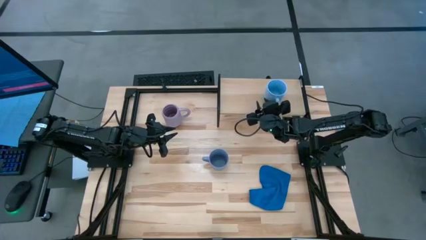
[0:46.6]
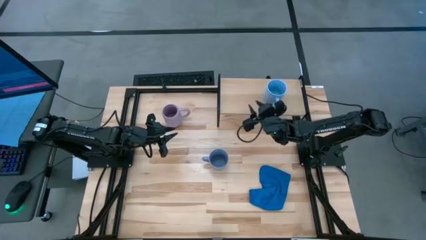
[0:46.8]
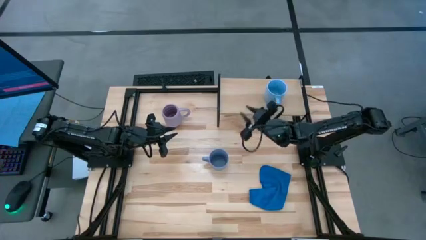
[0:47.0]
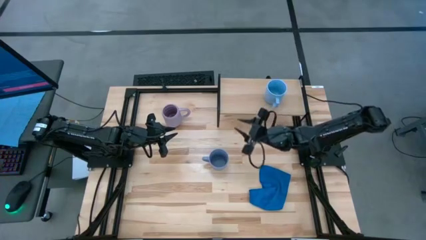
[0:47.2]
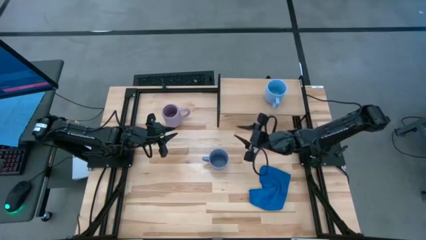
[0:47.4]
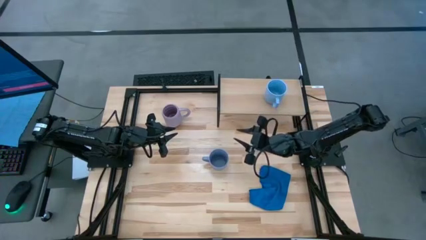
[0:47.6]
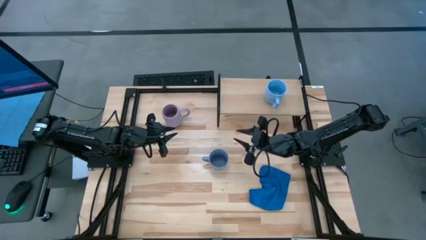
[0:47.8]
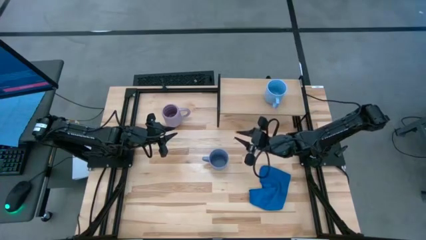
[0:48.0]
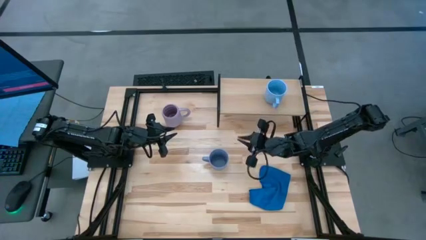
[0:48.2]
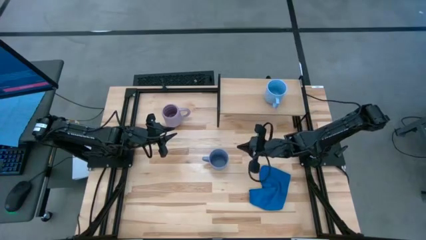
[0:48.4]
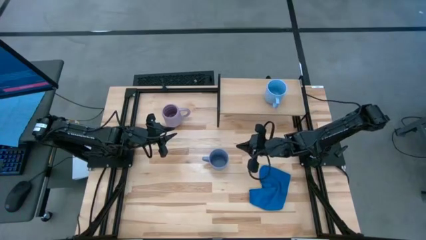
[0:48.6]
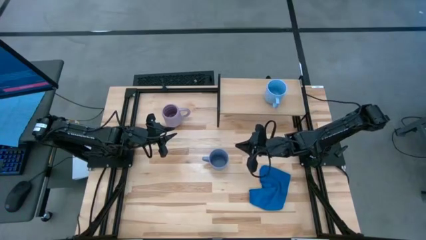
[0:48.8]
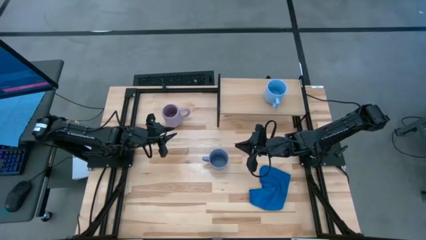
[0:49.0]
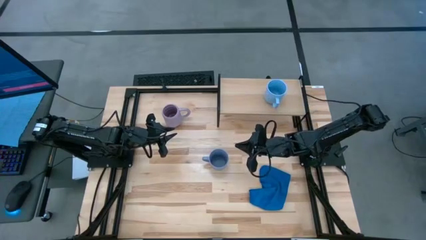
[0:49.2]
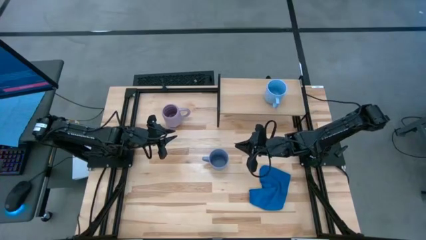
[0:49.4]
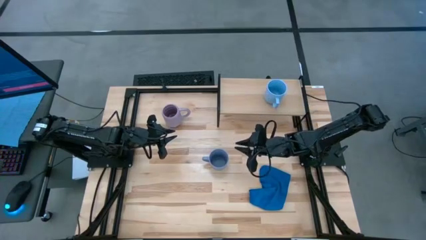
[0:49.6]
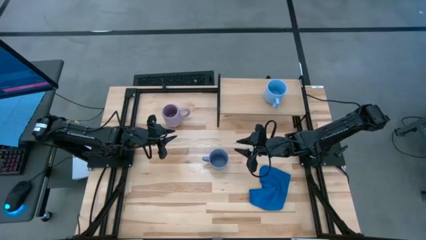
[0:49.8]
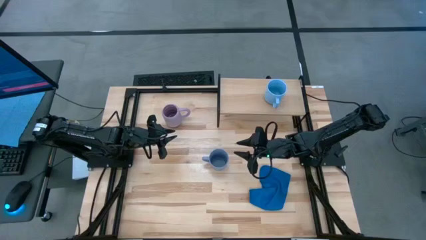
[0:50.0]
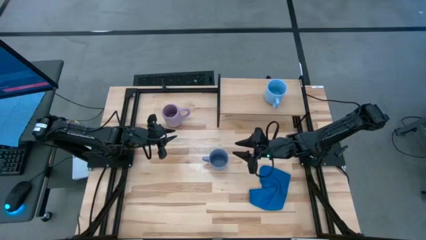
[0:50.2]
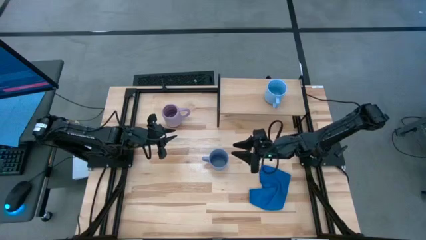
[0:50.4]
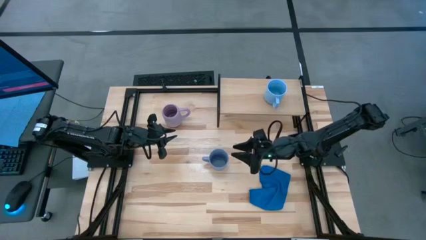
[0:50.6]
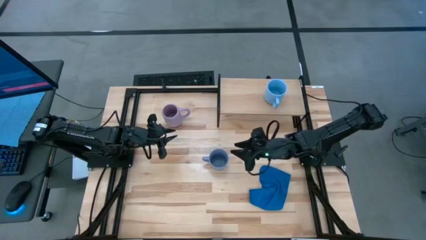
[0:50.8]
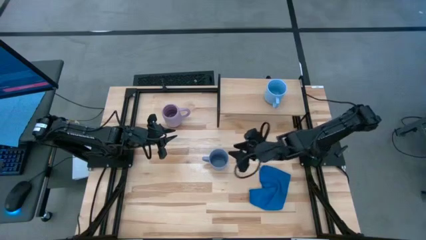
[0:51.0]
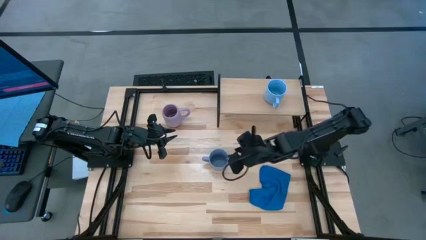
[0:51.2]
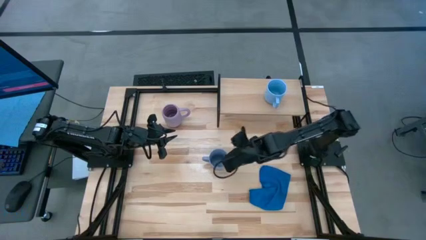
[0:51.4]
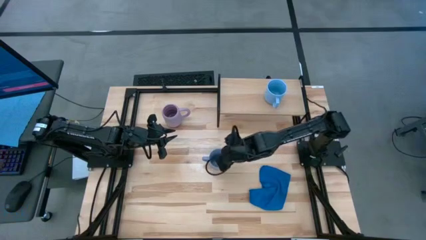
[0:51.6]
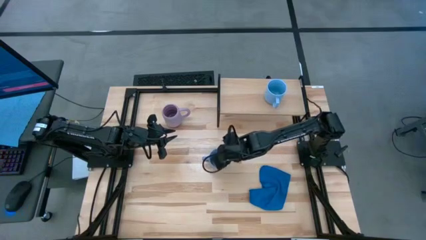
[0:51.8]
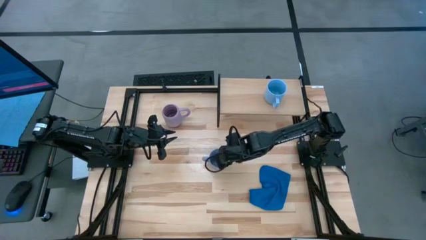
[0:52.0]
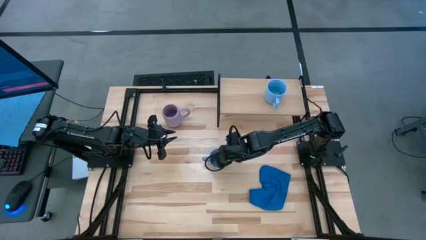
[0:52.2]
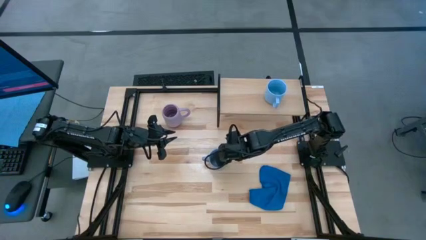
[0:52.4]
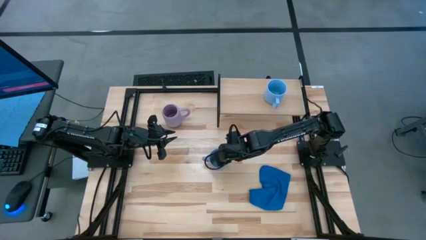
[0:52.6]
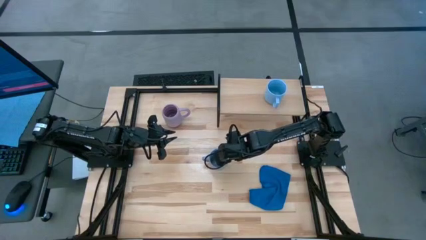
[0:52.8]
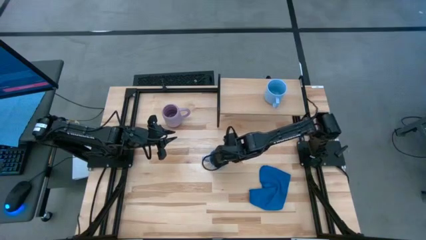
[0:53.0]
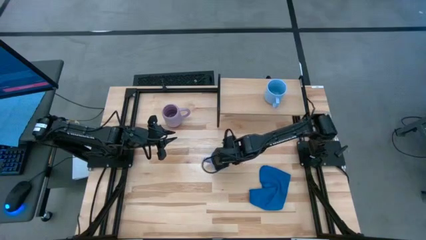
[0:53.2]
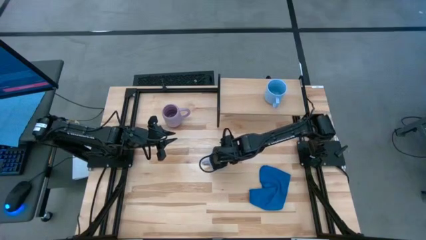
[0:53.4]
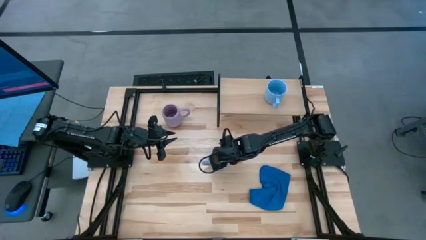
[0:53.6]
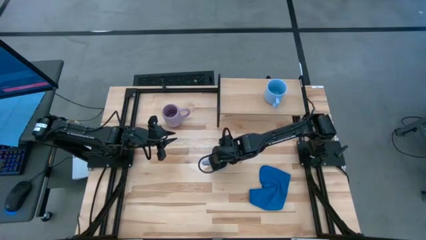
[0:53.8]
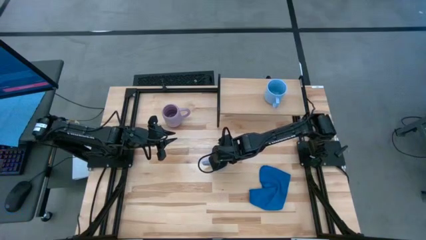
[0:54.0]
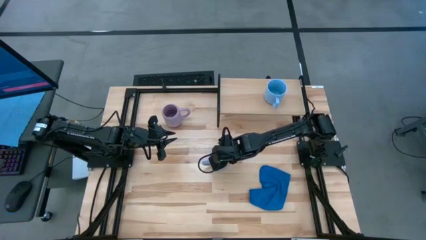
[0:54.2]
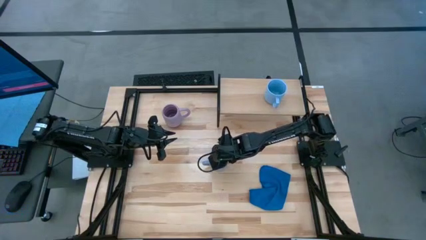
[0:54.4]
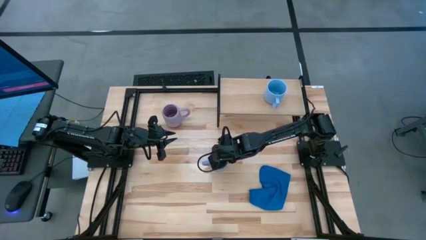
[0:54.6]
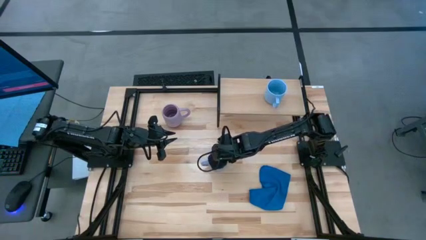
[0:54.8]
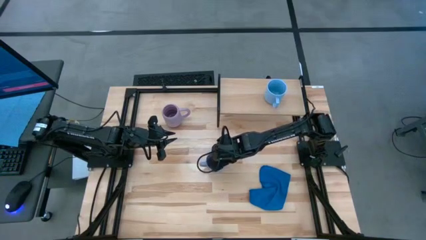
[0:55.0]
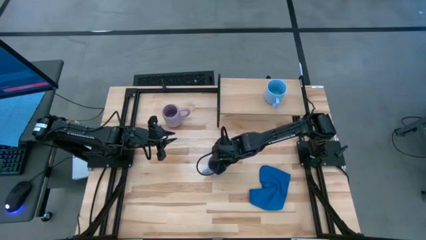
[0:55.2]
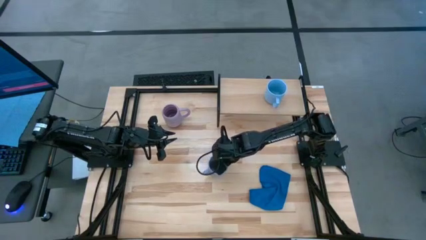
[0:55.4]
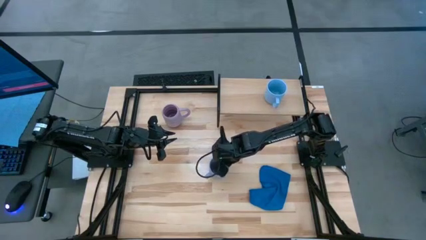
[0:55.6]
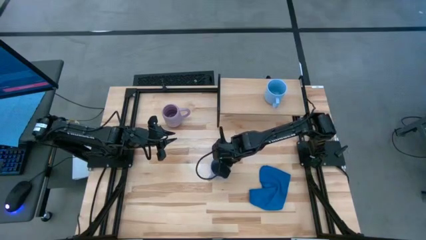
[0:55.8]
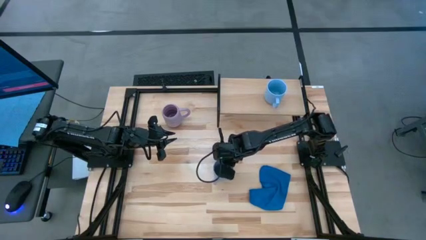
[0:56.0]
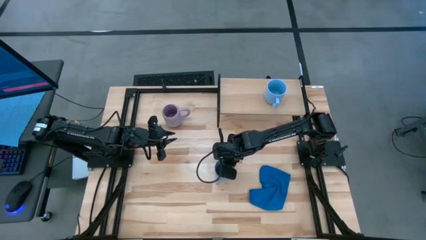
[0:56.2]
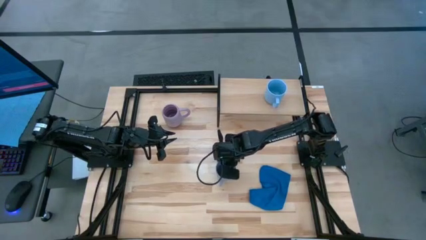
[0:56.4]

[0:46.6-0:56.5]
Task: Stack small to large cups/mugs on shelf
Put the blue mug on the shelf

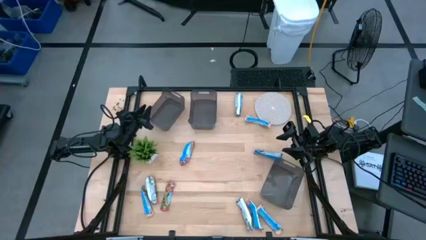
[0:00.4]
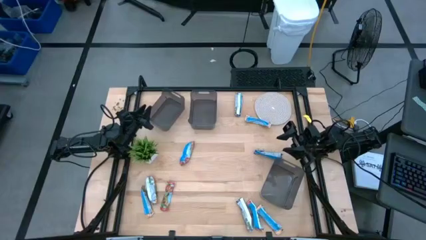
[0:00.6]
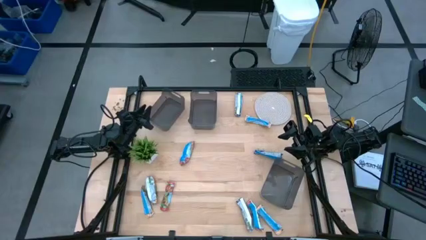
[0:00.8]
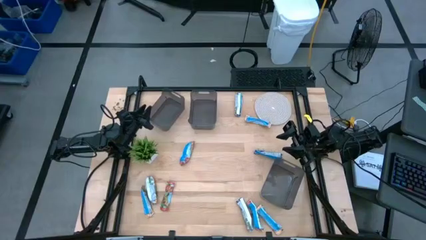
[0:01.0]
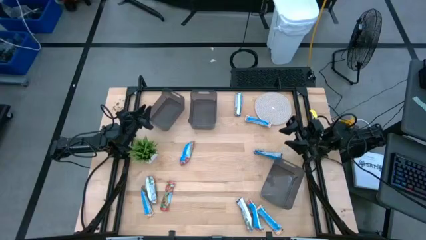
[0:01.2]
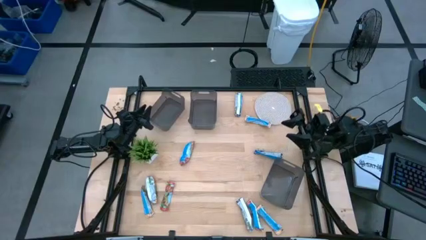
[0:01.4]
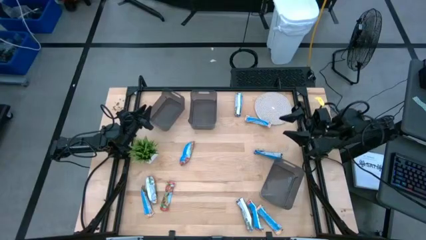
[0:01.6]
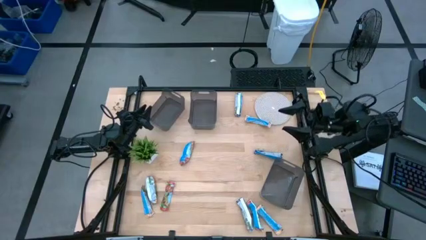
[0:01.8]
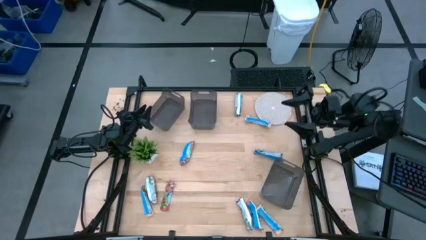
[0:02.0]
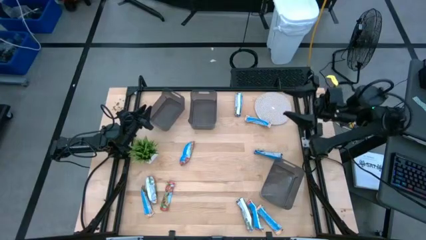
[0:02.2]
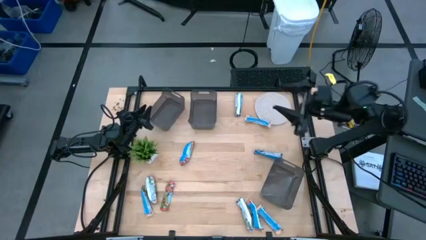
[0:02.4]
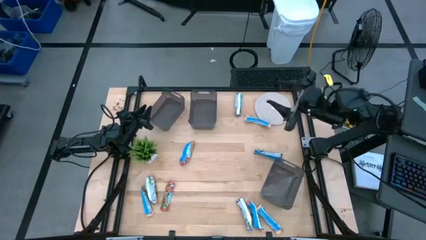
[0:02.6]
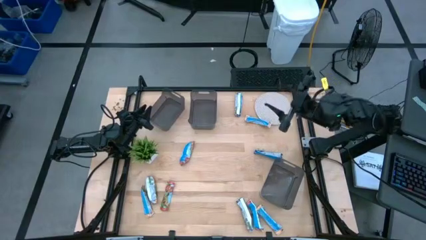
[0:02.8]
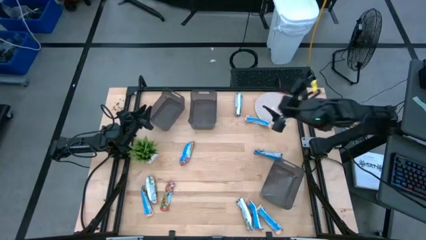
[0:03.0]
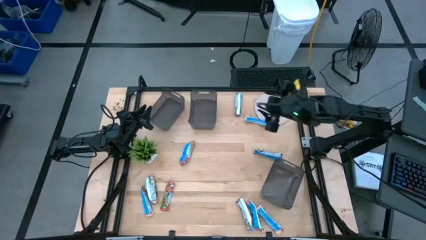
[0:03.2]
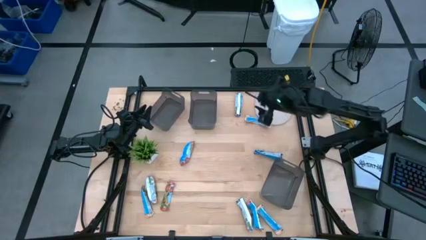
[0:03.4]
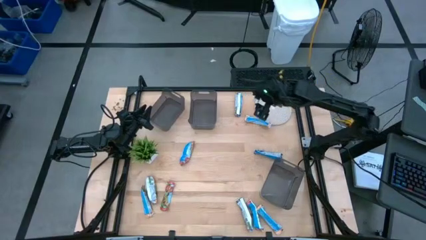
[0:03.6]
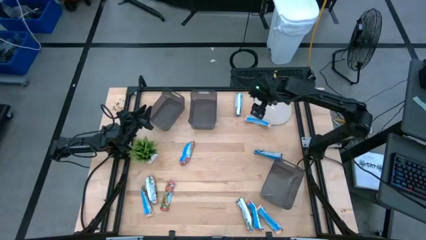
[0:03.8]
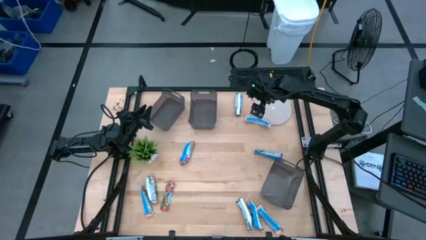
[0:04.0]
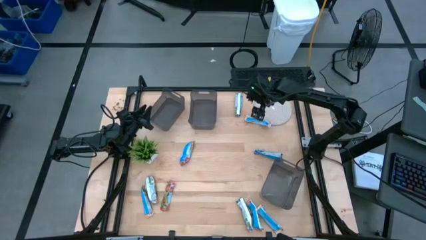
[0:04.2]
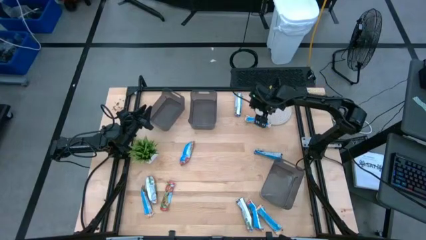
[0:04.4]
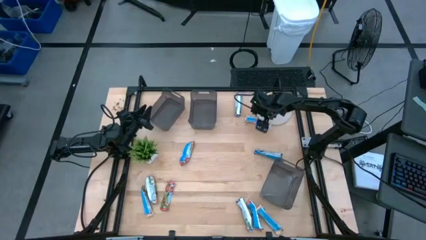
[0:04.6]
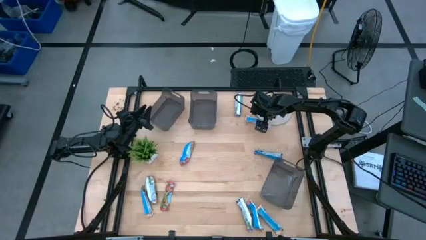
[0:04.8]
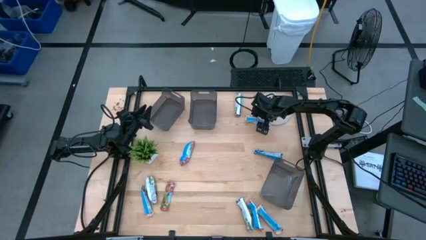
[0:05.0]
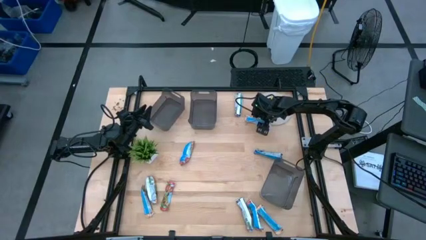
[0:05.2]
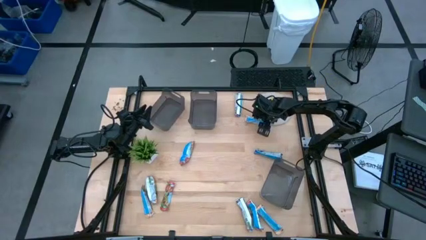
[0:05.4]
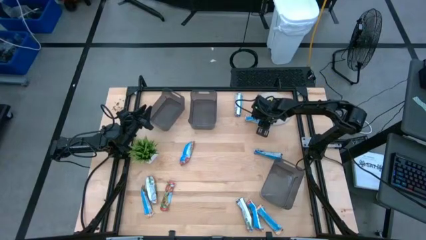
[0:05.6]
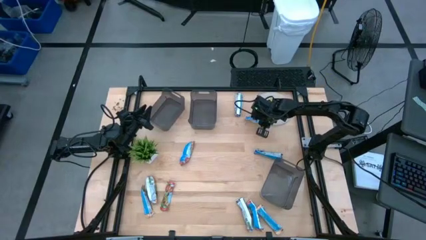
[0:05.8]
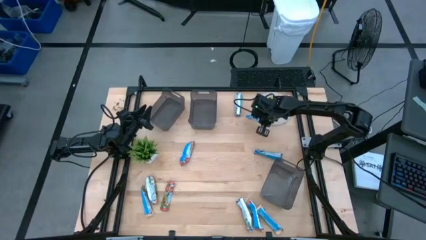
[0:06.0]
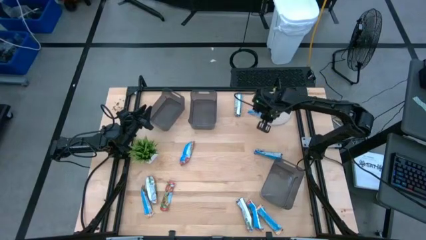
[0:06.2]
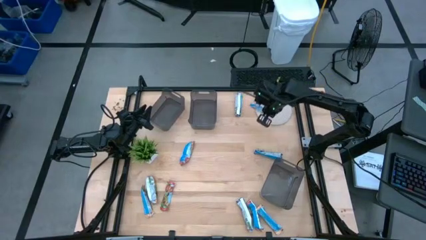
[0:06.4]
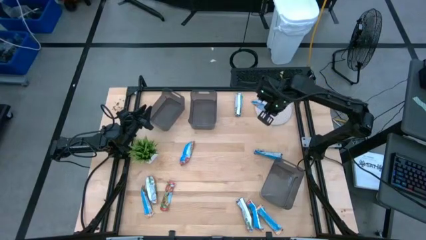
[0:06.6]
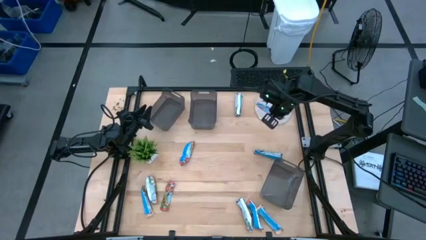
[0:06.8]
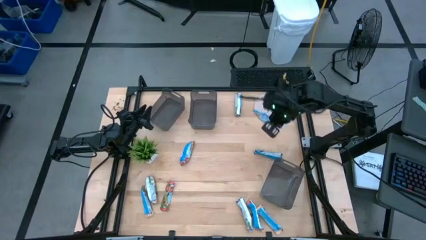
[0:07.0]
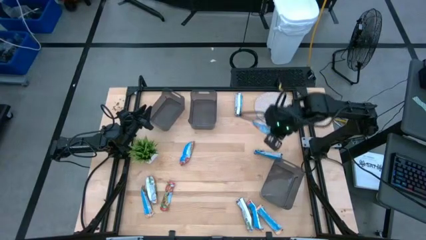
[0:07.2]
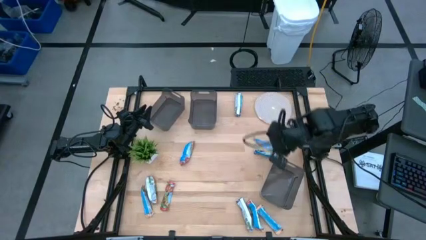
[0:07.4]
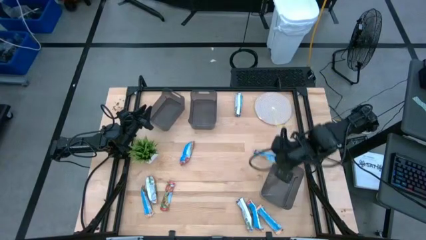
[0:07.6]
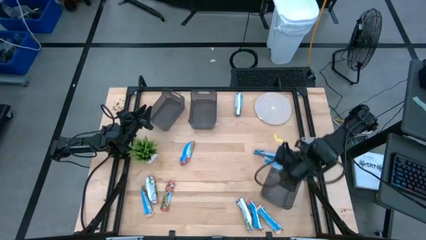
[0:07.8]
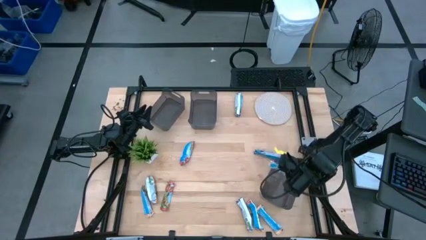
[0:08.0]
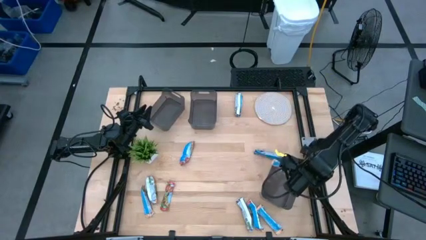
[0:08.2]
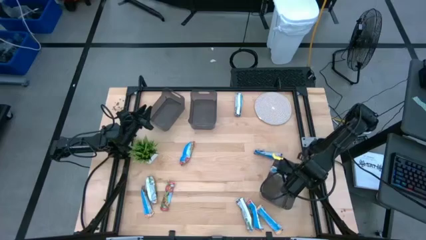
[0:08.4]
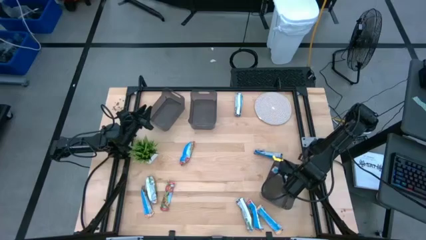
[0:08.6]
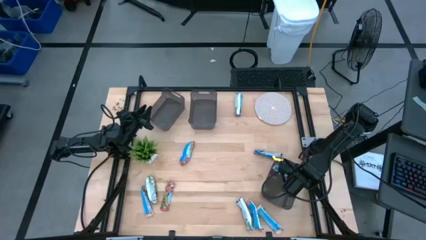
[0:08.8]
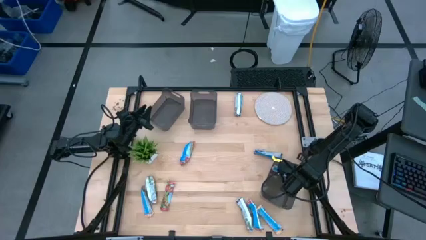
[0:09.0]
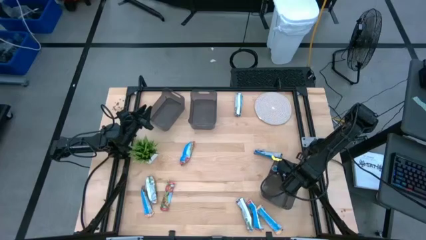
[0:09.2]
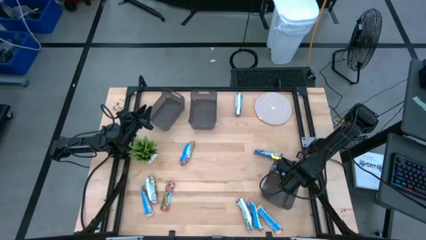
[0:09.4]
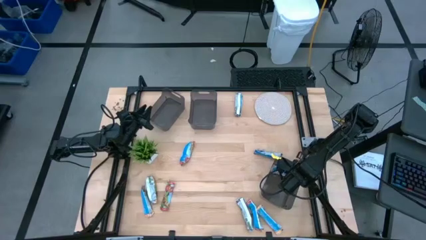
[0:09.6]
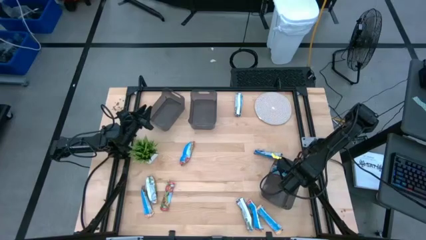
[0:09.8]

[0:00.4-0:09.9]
Task: Pick and place Granola Bars by type
Put the yellow granola bar into the bottom black transparent bin
